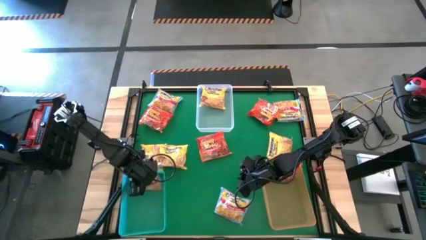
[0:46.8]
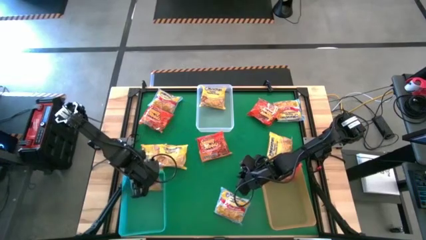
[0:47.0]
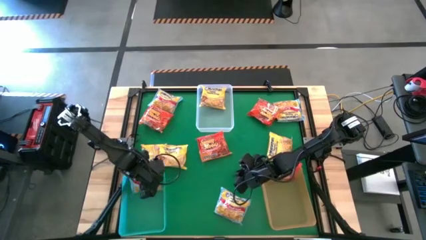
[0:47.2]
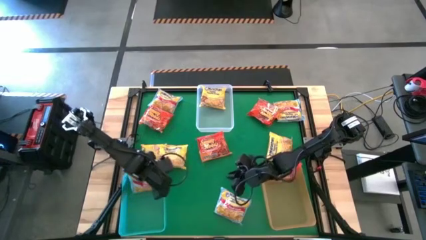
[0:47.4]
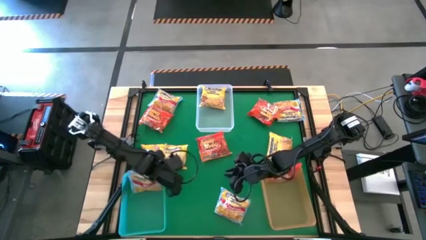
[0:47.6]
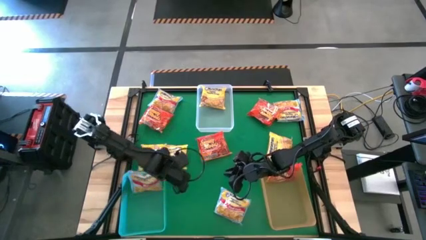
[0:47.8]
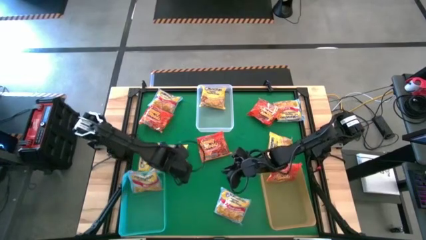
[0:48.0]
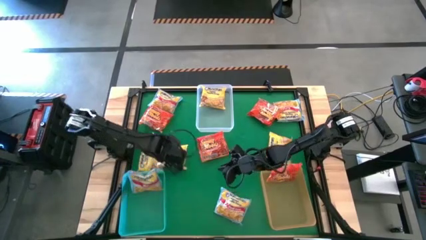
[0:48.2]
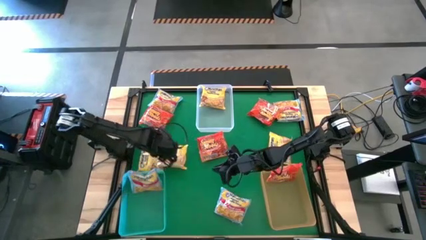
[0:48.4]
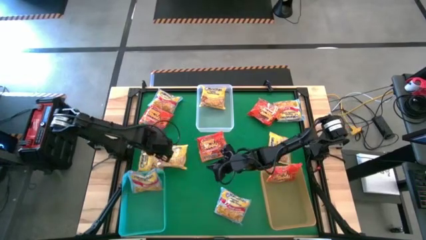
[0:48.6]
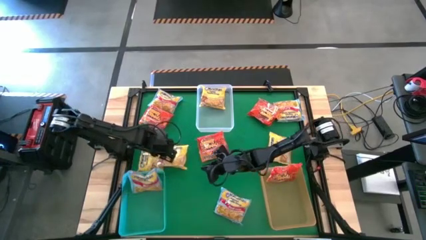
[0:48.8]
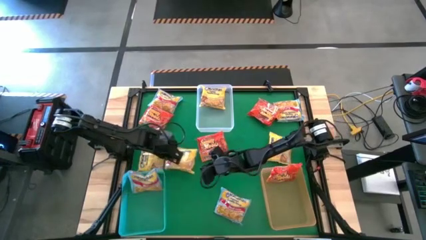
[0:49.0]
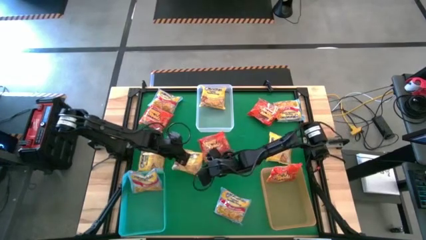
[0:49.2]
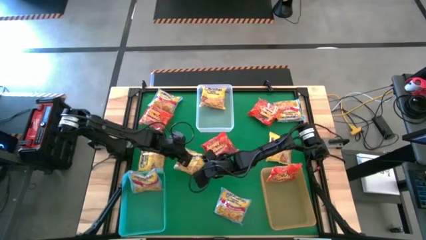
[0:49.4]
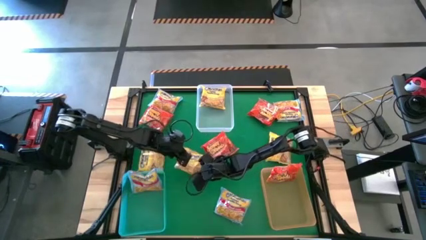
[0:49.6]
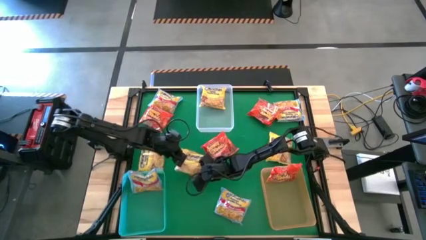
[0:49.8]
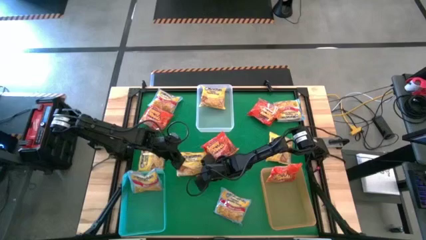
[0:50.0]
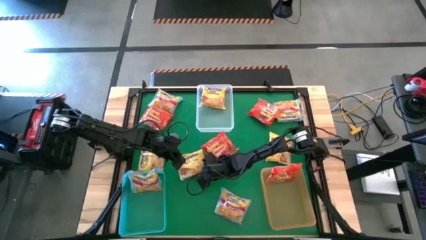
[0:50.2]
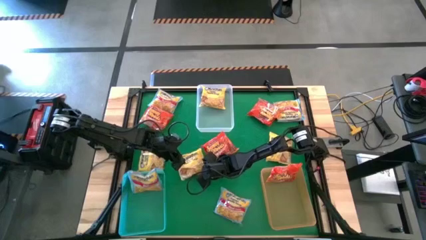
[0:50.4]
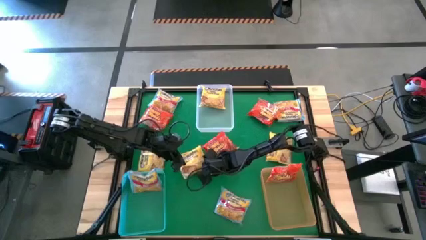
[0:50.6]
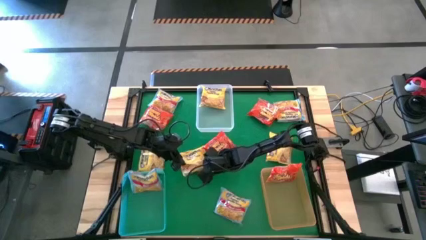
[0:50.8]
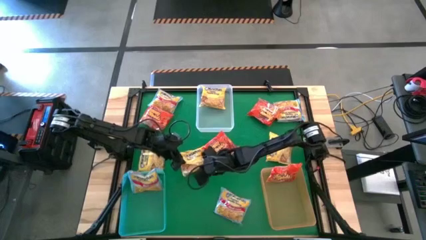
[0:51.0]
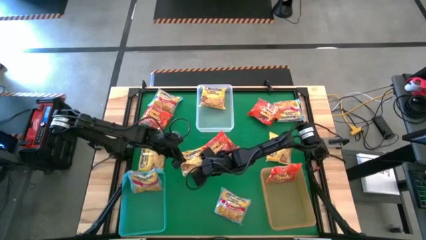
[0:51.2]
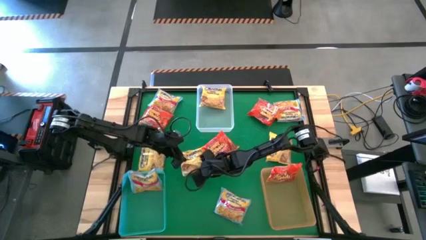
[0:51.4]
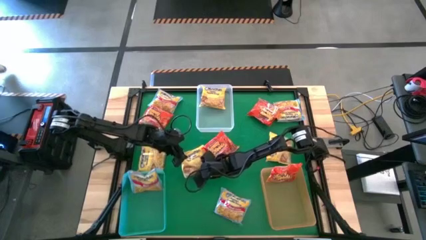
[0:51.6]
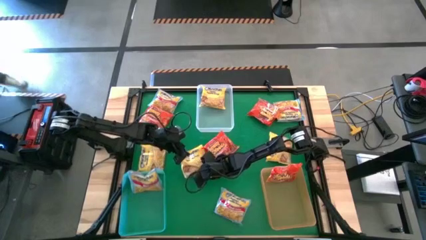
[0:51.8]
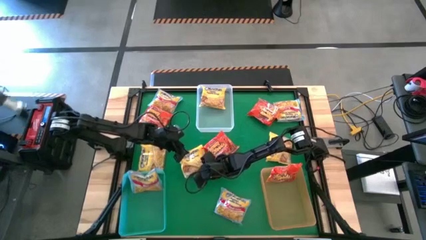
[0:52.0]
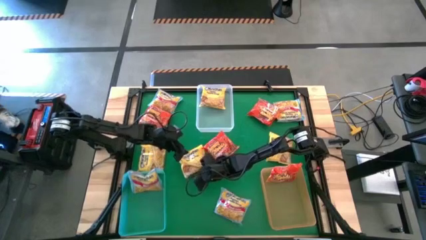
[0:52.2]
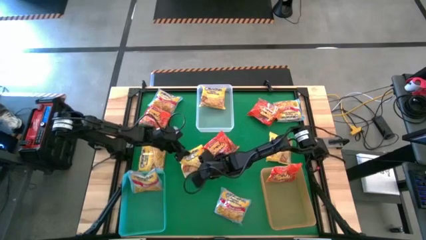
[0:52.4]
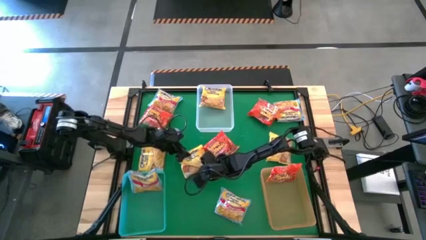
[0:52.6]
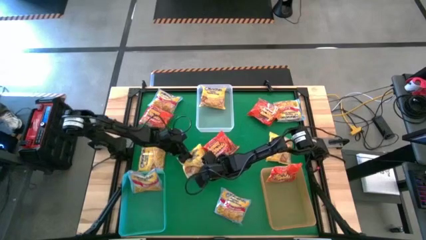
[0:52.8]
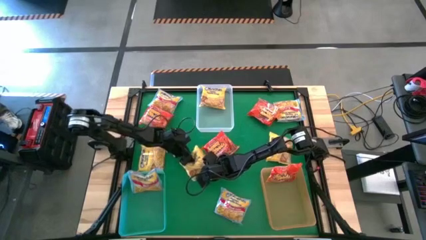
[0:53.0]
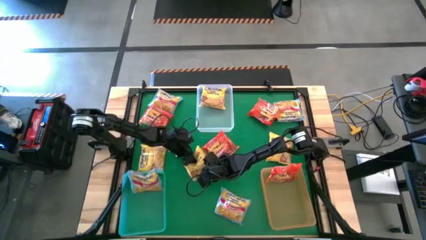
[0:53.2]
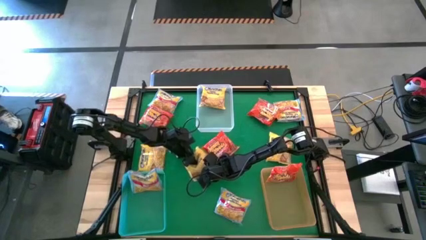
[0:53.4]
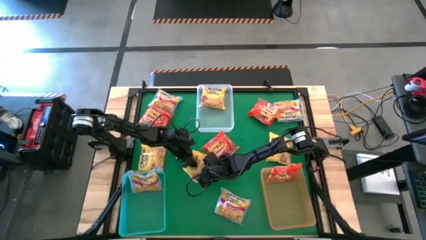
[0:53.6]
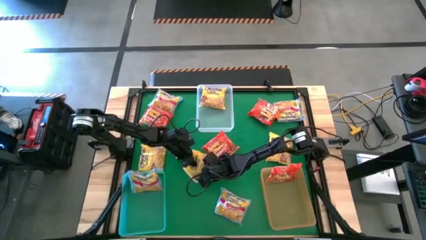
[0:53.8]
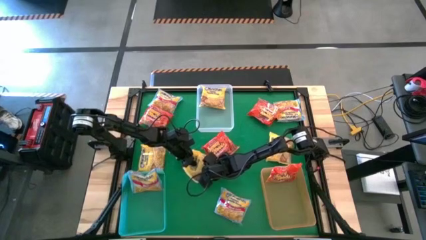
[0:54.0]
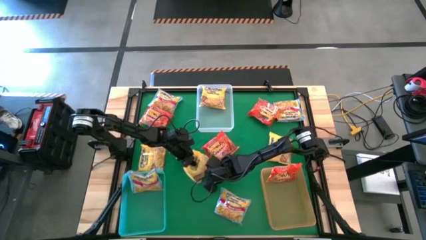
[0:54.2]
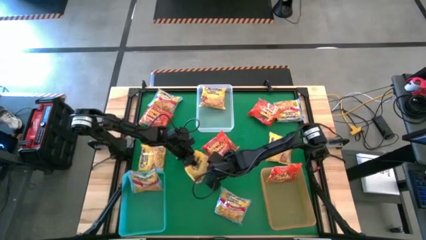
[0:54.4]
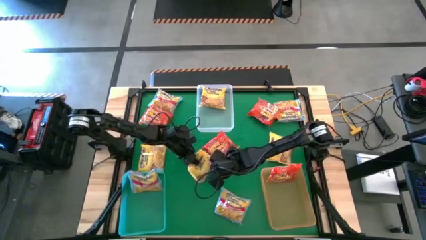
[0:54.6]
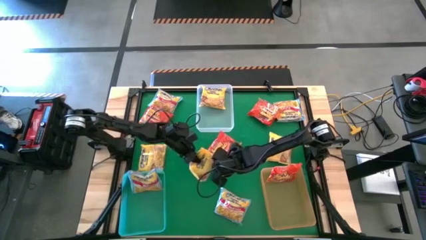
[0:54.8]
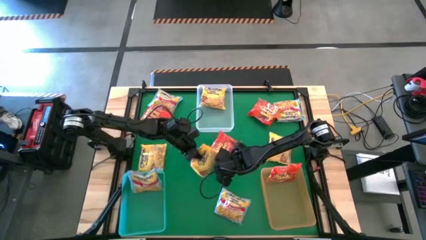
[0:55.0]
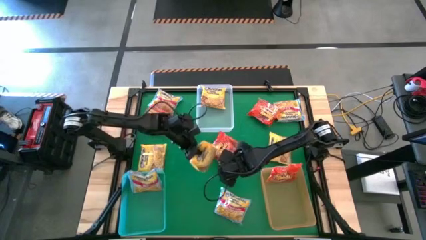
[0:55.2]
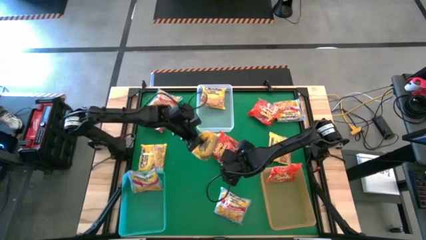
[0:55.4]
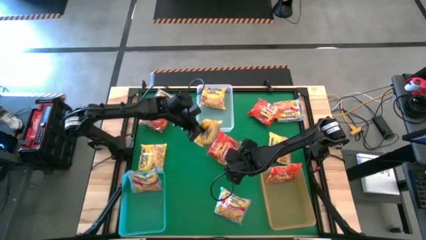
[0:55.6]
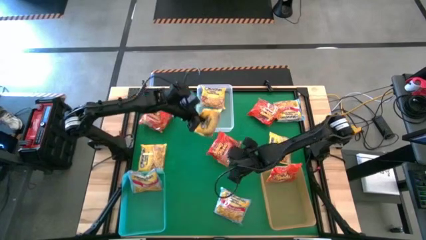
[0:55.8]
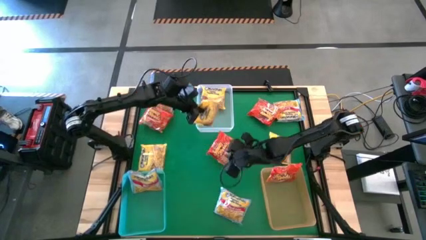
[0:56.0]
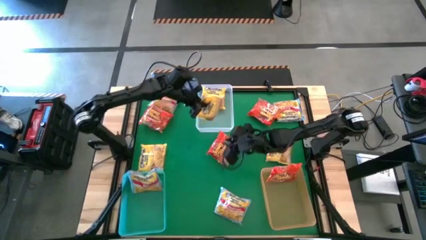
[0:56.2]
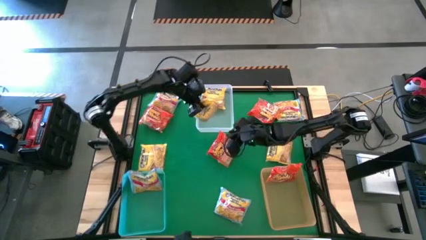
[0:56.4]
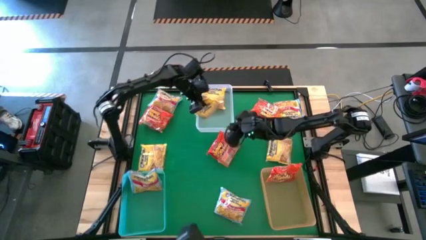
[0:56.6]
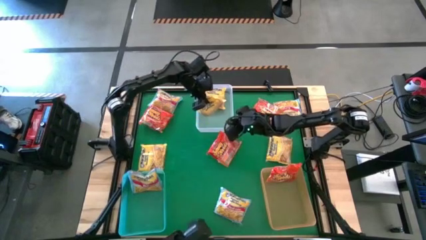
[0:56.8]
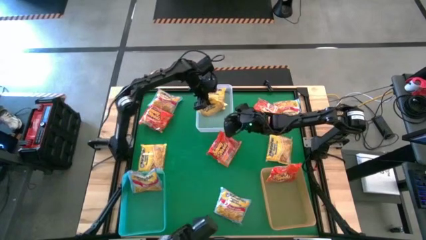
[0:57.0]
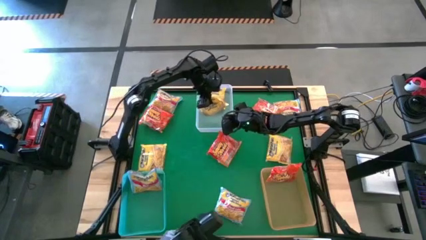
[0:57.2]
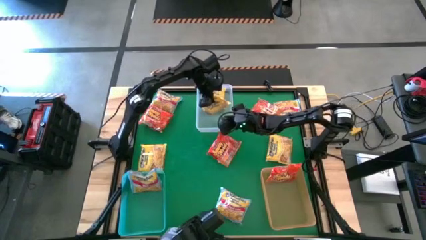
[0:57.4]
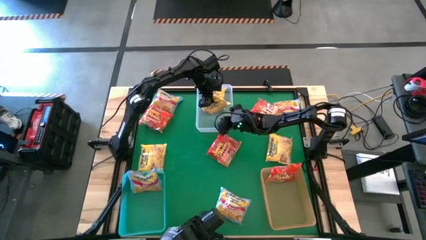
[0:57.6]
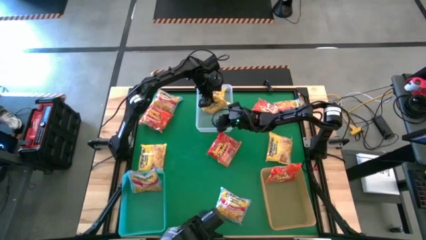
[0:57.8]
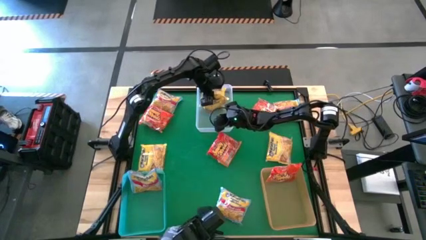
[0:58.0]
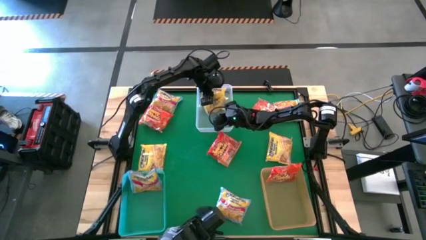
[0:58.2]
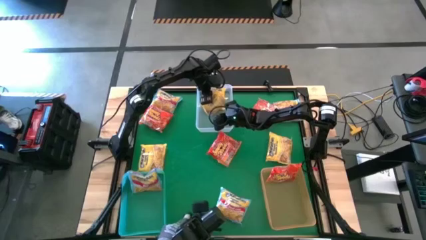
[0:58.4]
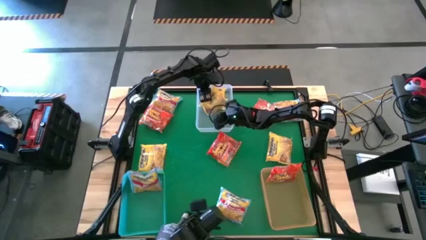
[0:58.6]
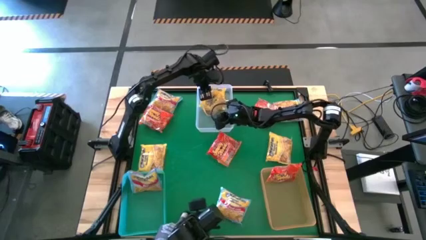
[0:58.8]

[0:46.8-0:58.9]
Task: Sort Maruchan noodles
Put the middle yellow noodle pack into the transparent bin

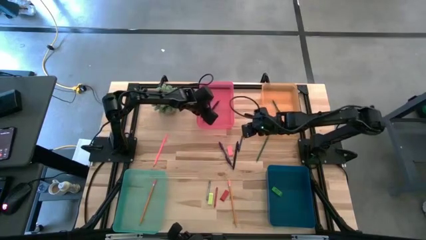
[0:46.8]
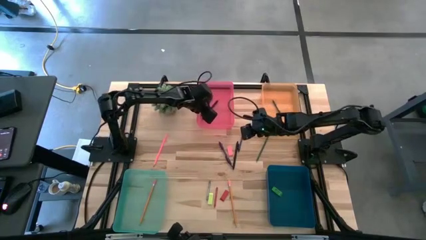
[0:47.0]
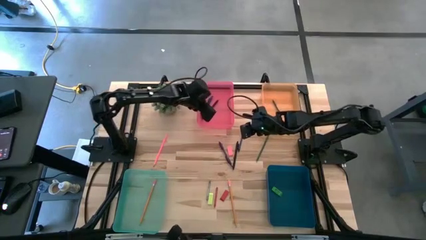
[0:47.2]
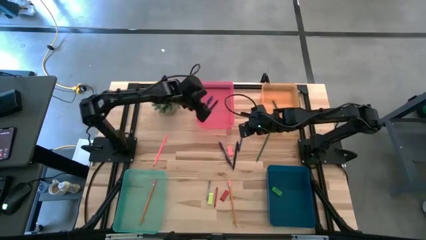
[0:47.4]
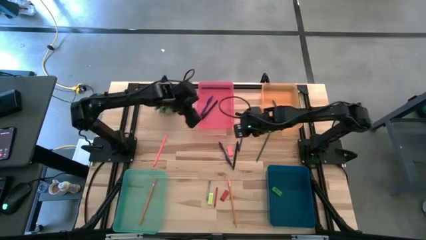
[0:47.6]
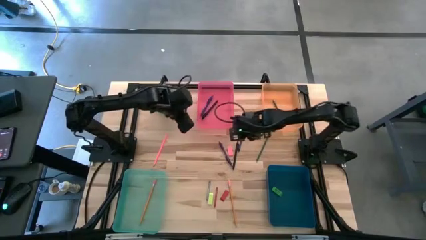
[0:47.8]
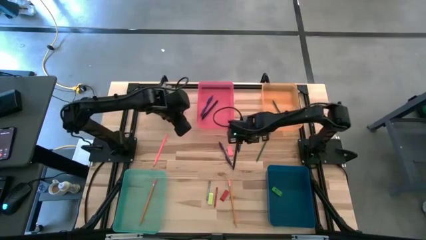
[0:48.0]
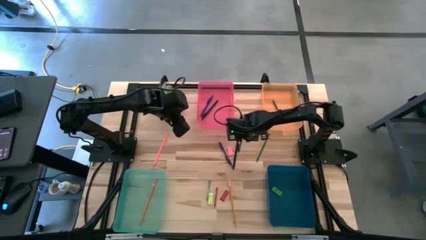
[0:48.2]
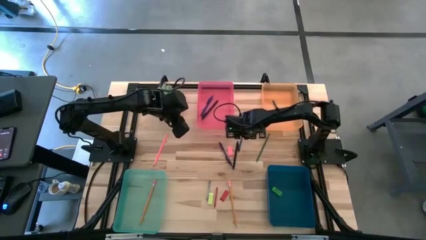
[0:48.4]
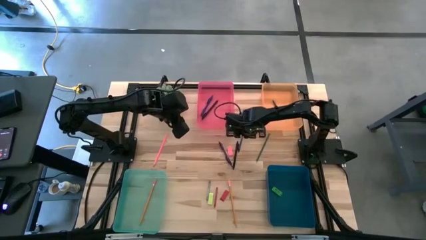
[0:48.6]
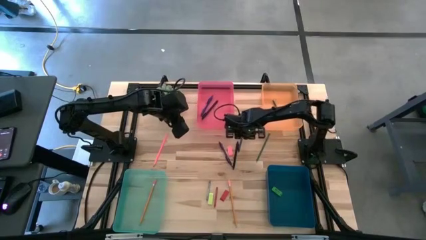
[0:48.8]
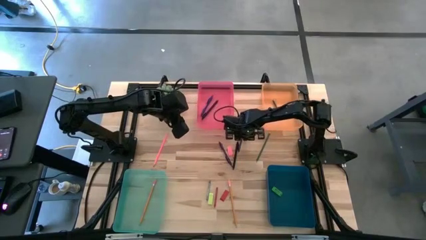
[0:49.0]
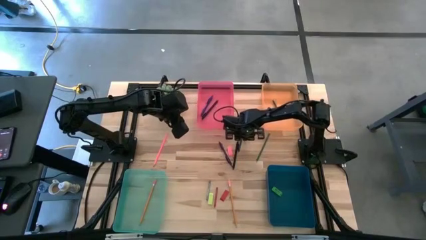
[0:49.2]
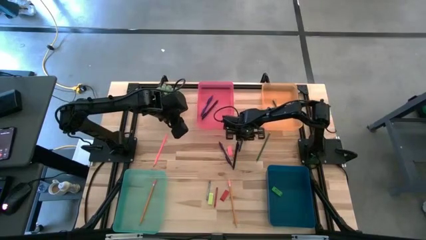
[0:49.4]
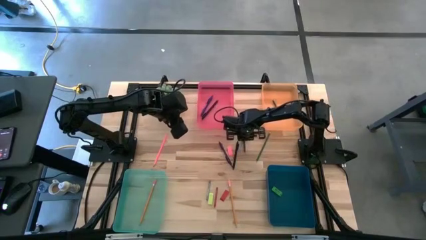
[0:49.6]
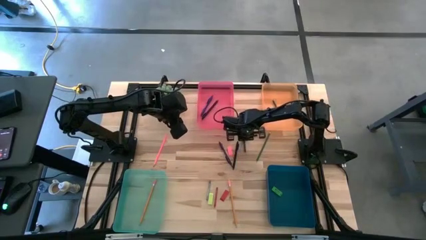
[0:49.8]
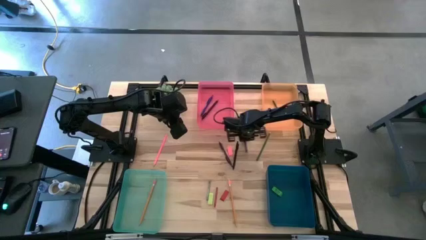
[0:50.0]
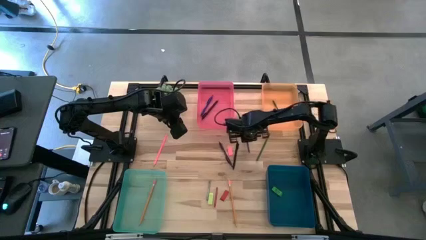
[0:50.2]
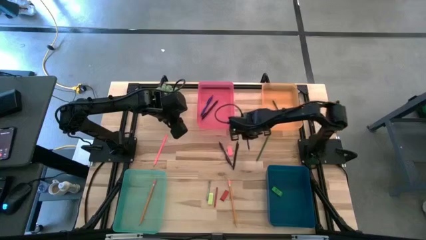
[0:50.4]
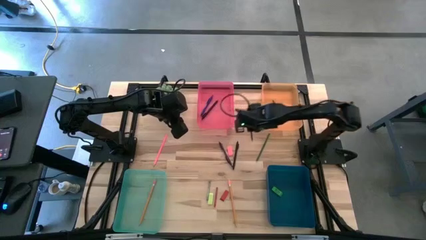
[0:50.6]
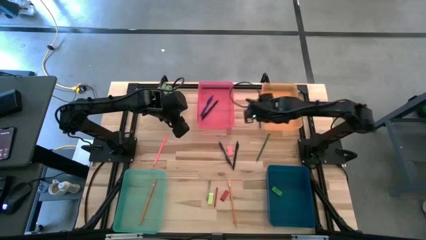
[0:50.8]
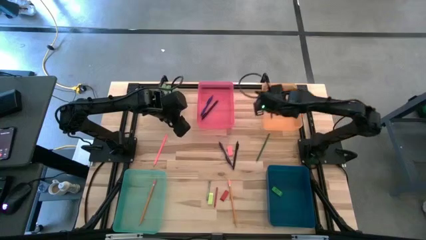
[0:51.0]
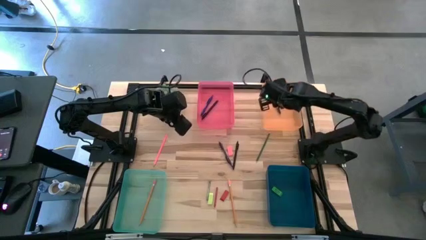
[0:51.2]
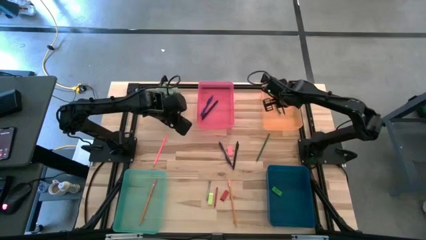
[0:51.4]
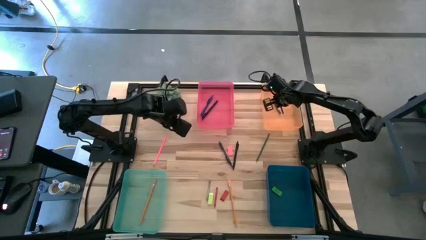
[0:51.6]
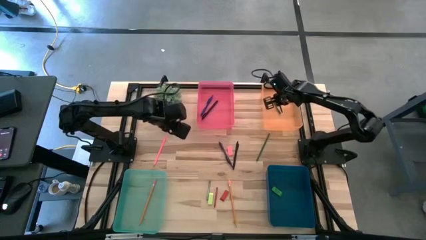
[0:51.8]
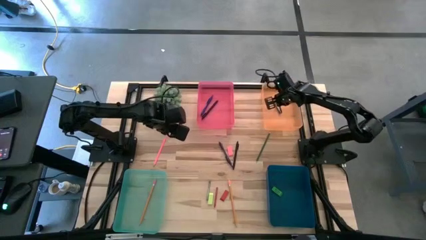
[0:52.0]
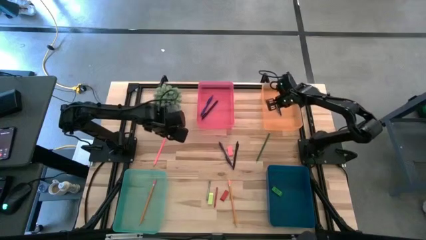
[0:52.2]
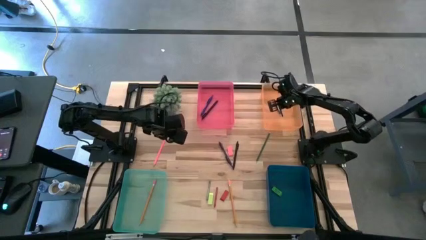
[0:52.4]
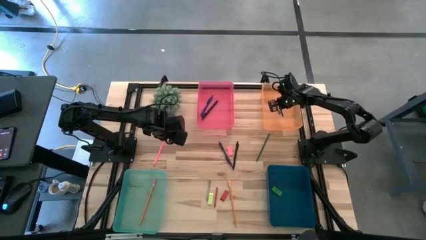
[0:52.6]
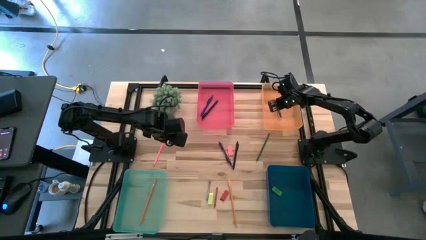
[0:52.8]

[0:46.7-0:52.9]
Task: Sort crayons/erasers/pens/pencils in bins
Put the blue crayon into the orange bin
